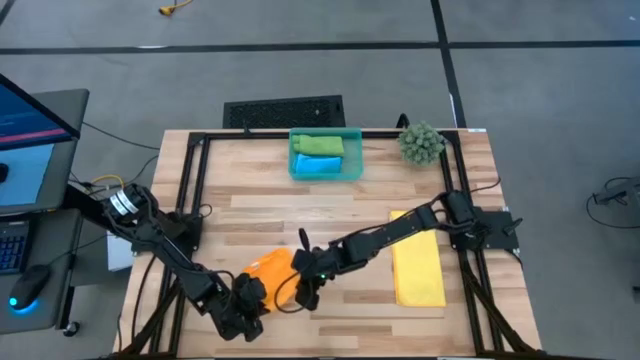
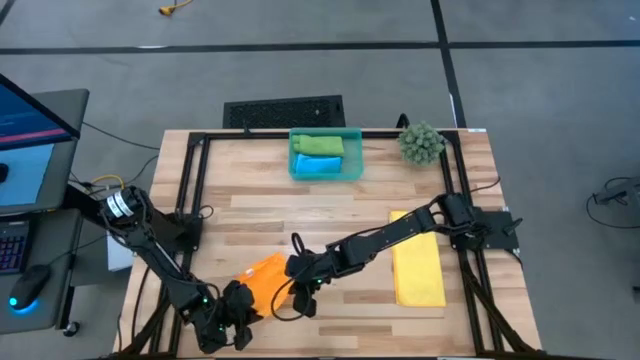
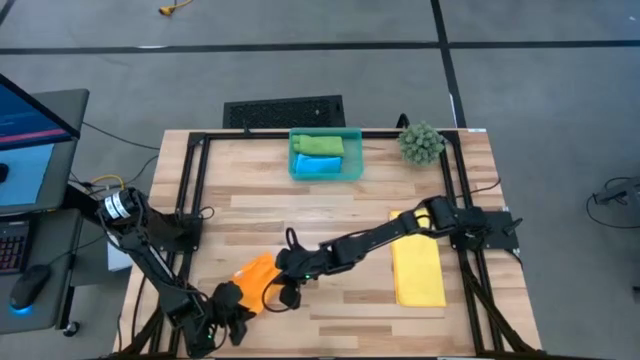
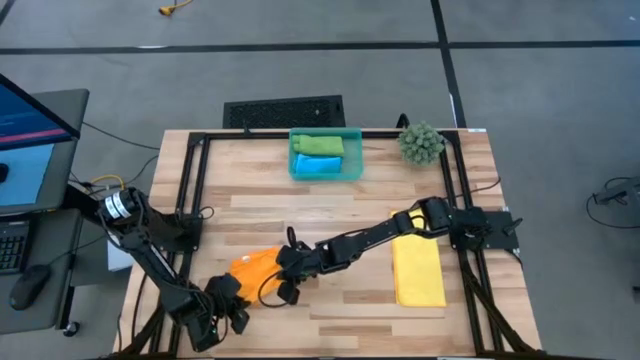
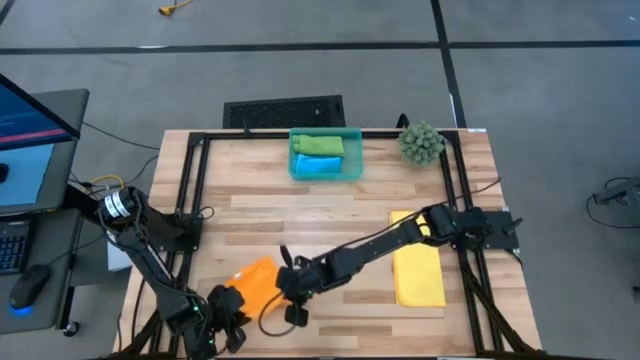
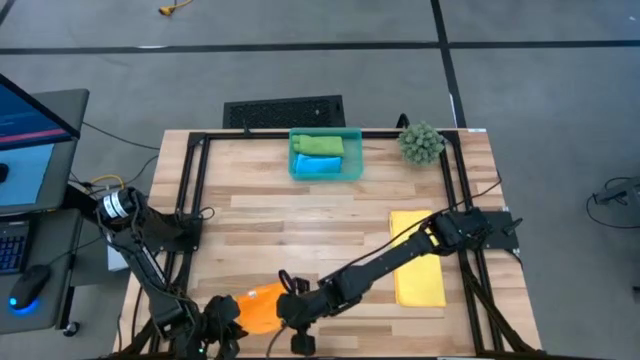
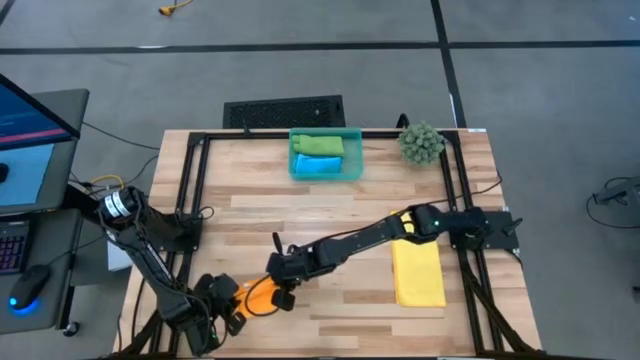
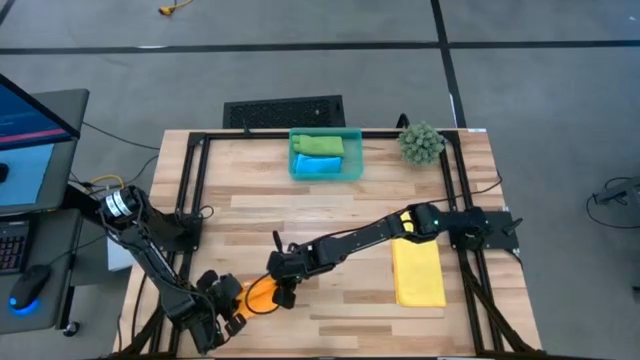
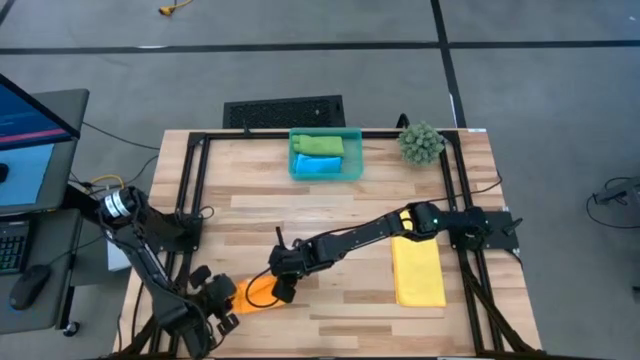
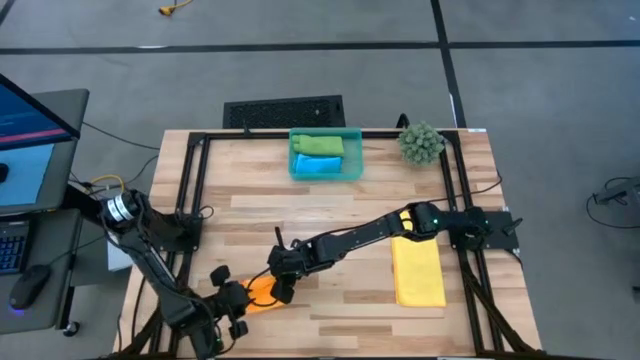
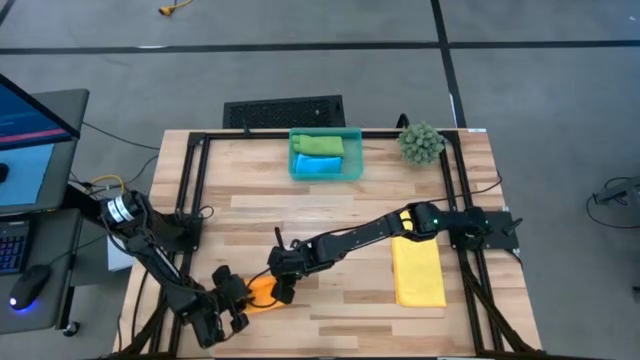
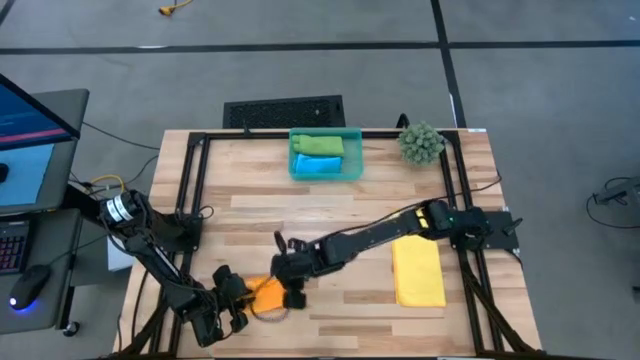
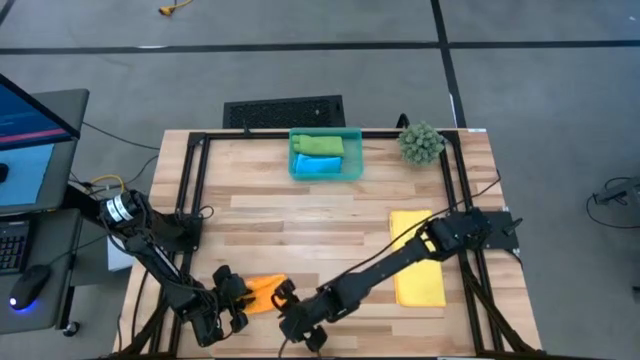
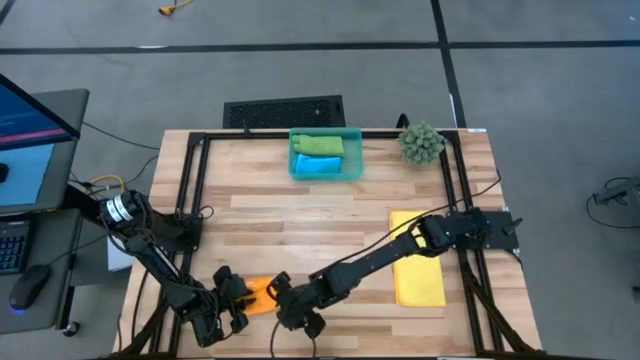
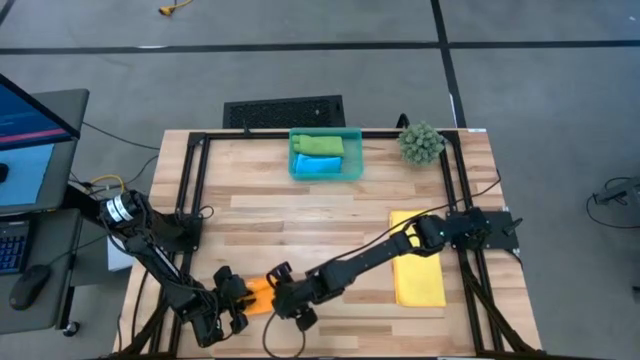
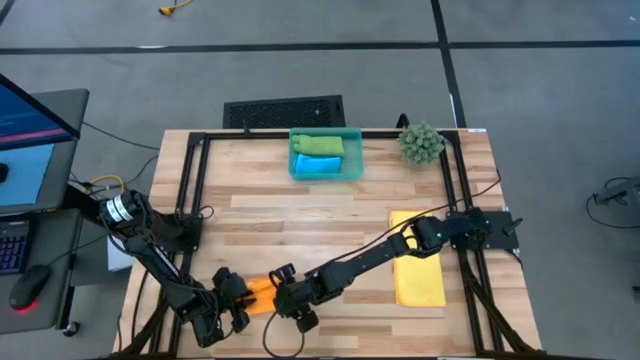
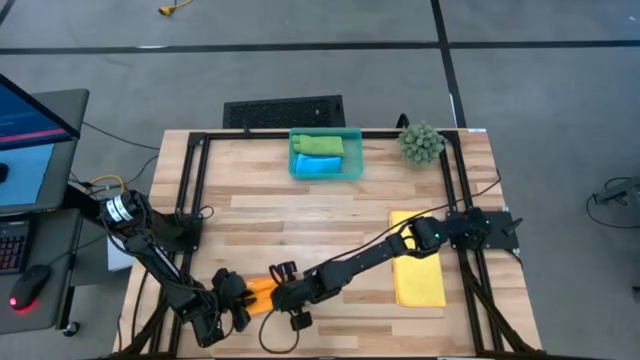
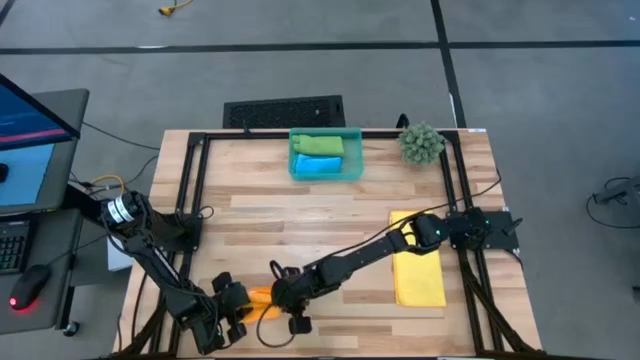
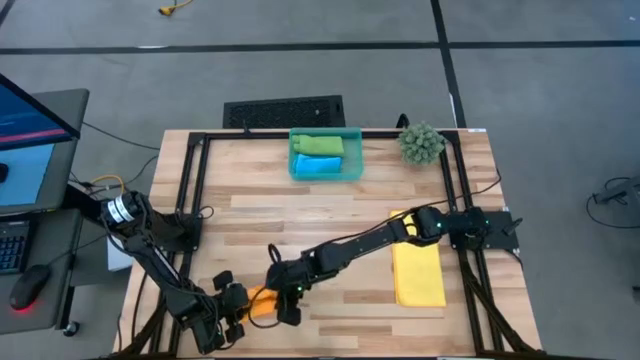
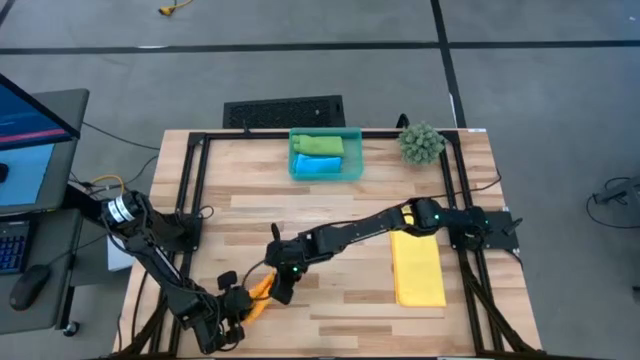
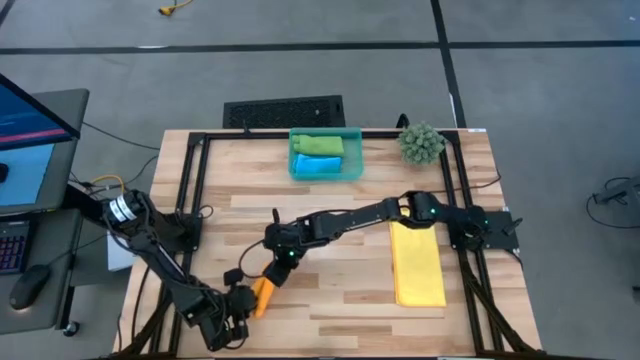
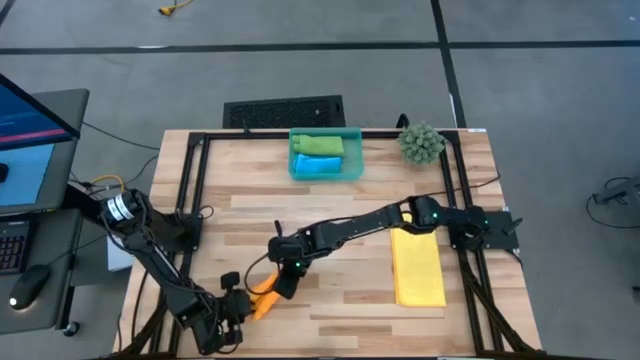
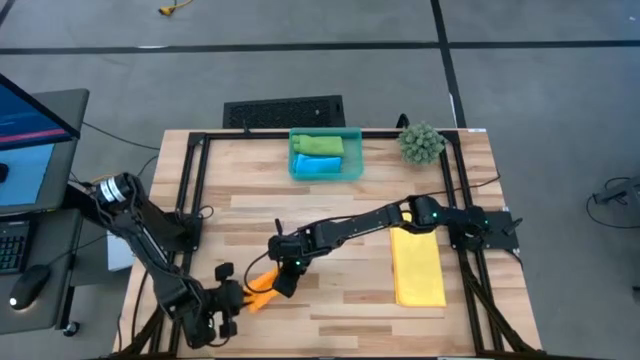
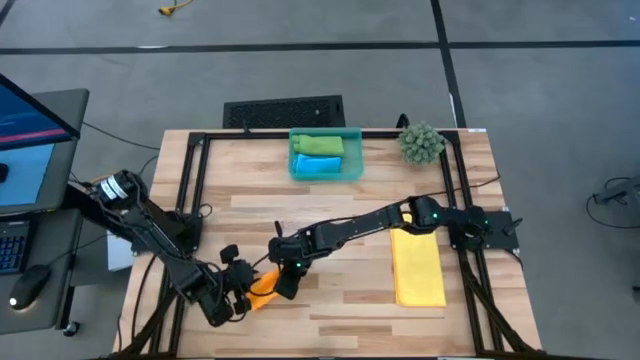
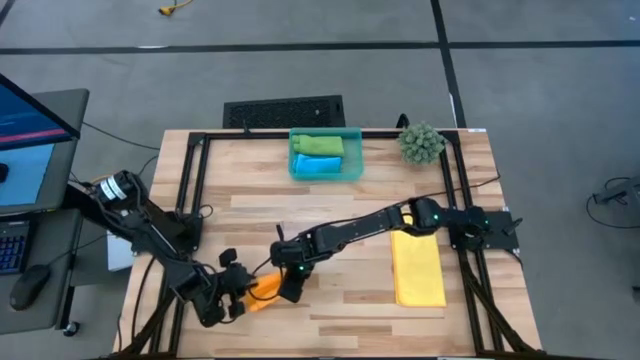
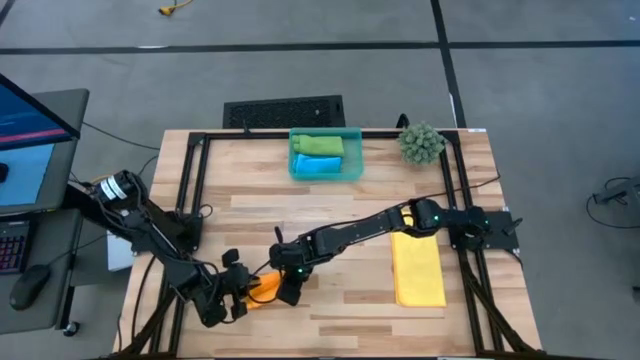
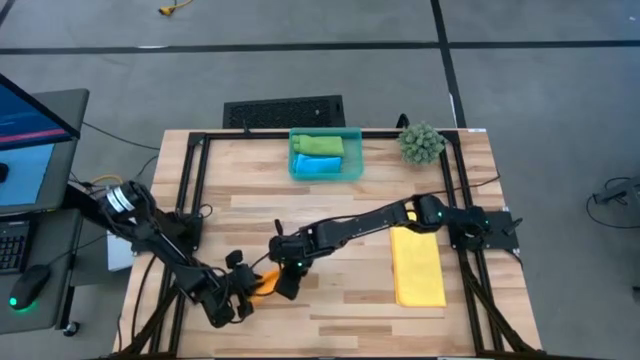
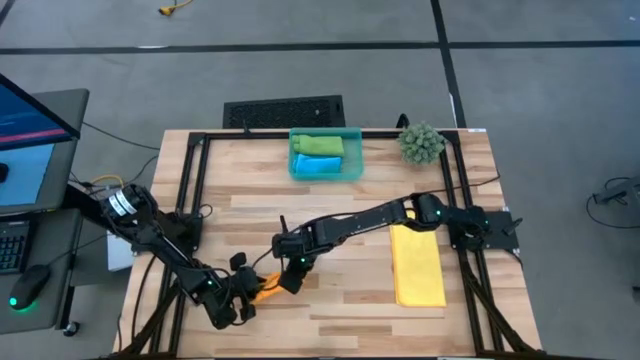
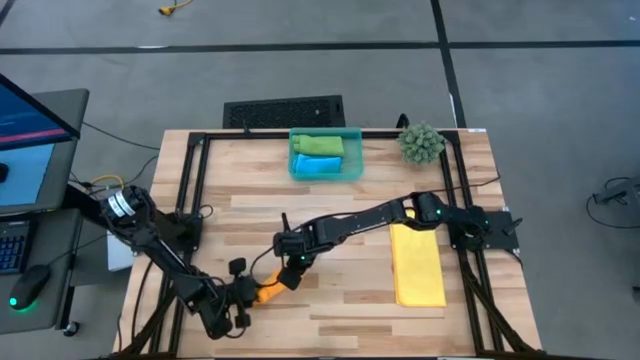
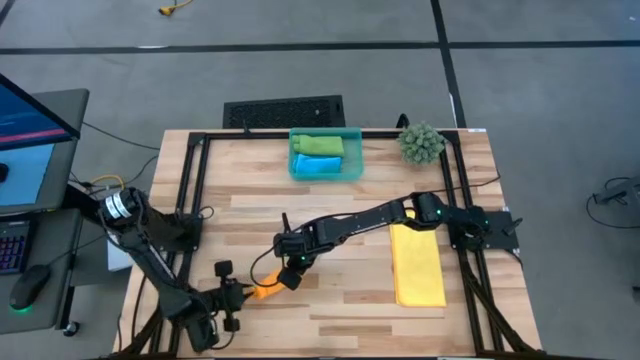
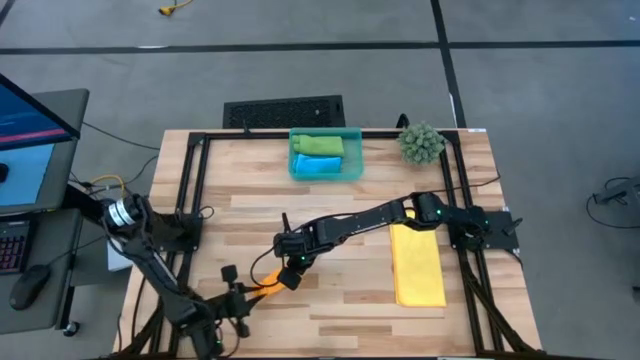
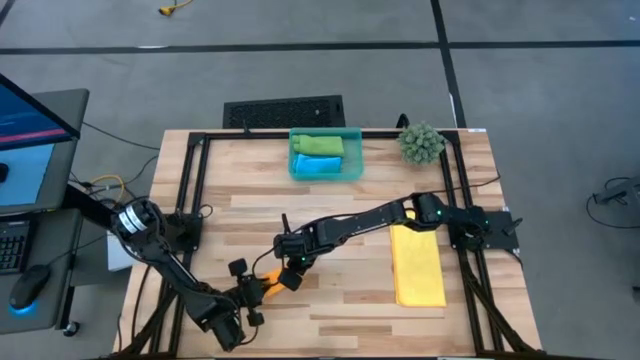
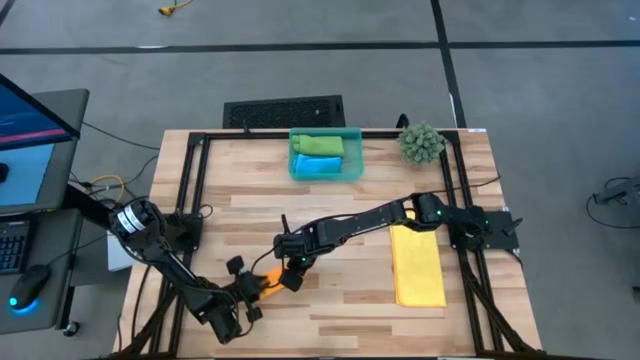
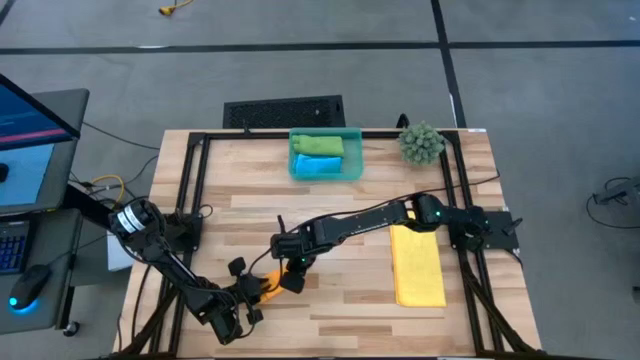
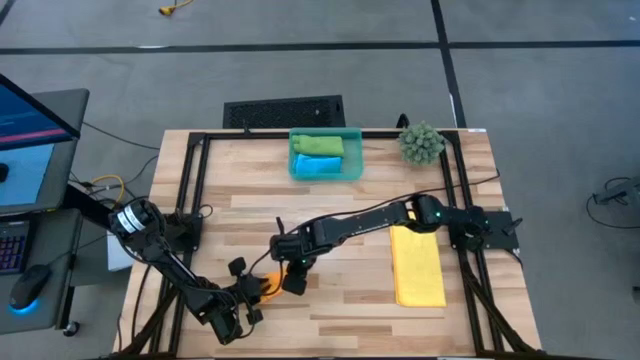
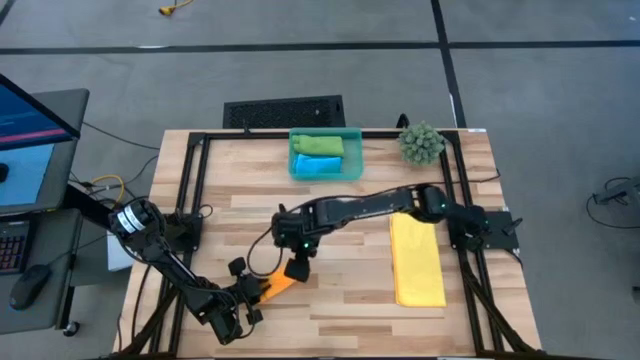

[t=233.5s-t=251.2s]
Task: Roll microfiber towels into tight, uniform cylinder then place into a basket
Roll the orange towel

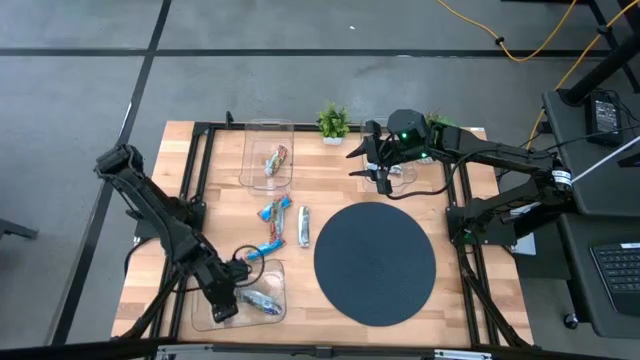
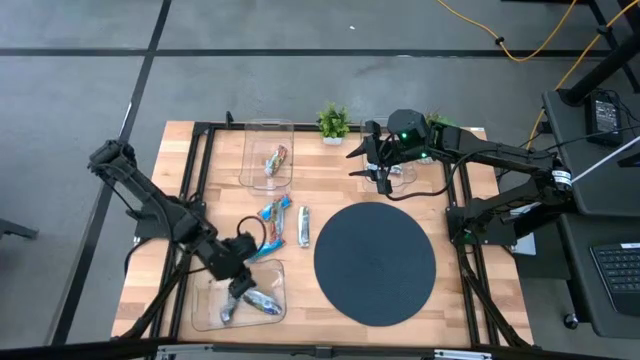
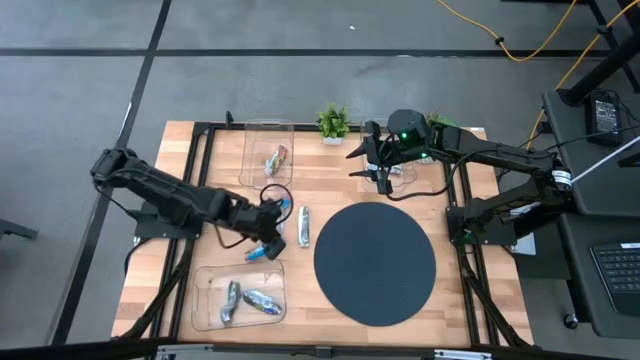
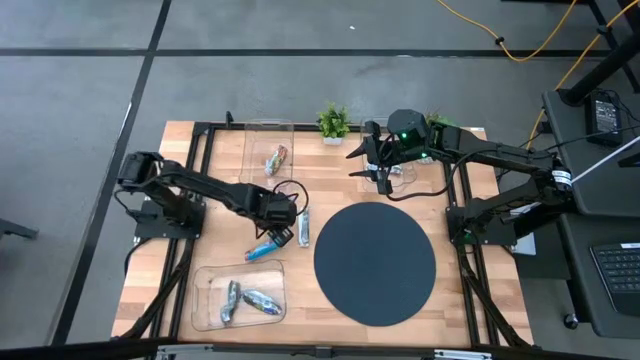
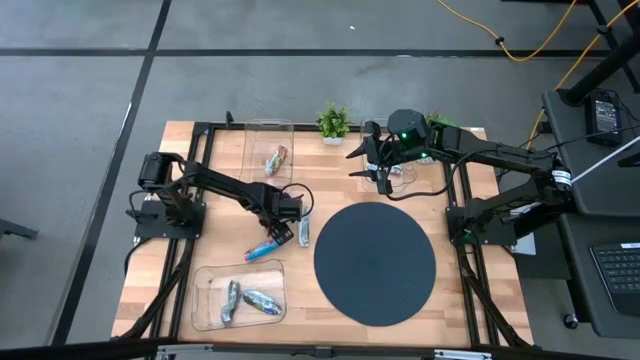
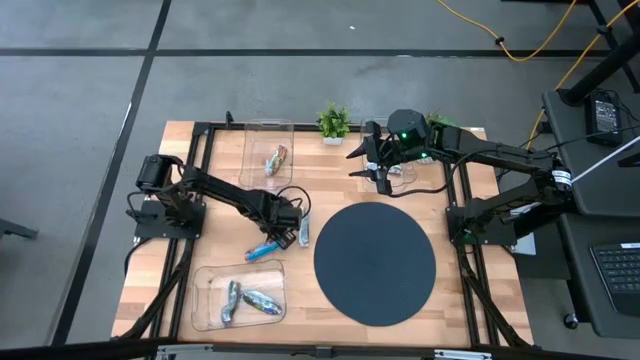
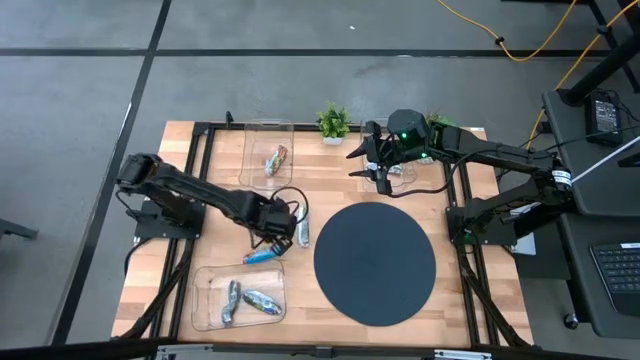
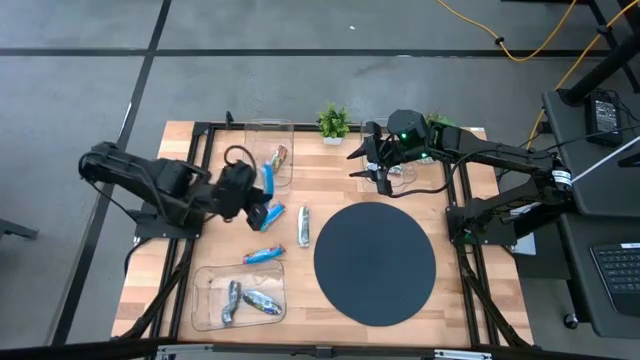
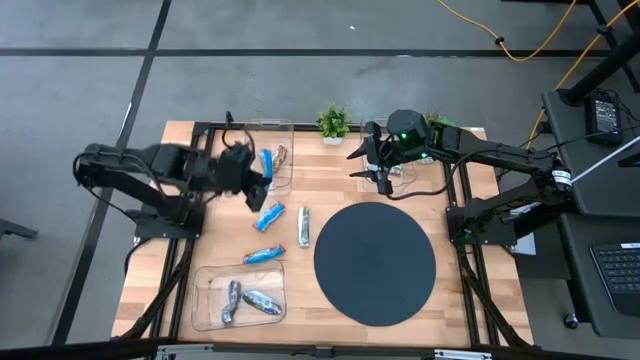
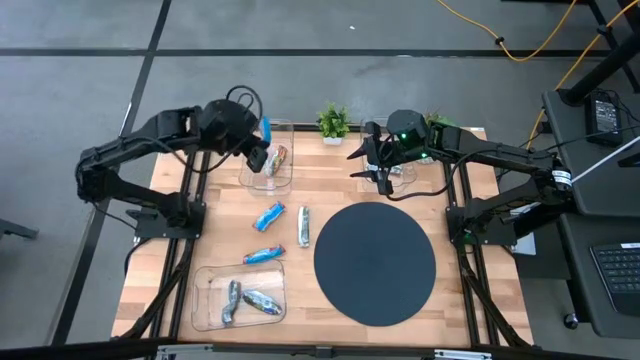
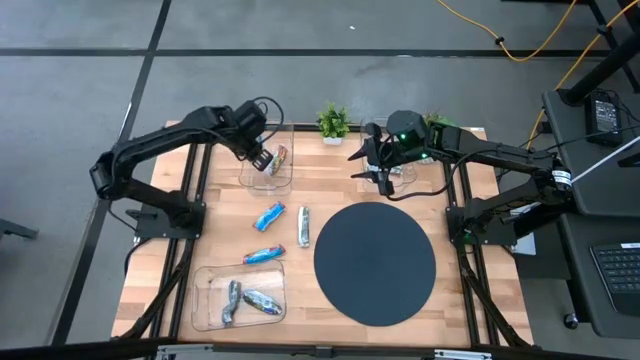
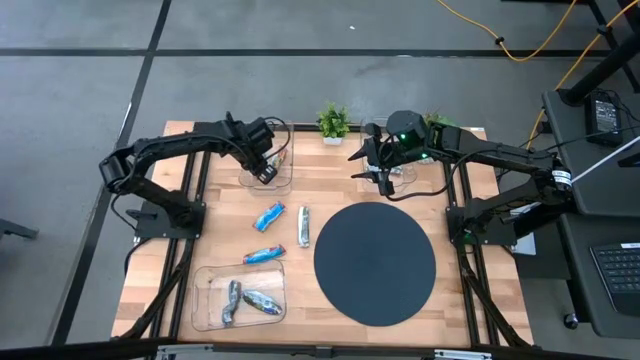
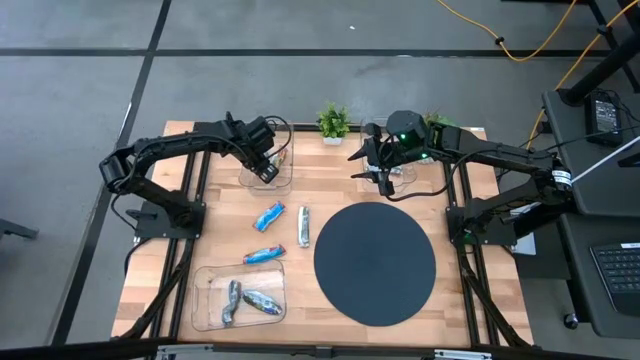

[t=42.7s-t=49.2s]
Task: Pick and place Granola Bars by type
Put the red granola bar into the top left transparent bin
